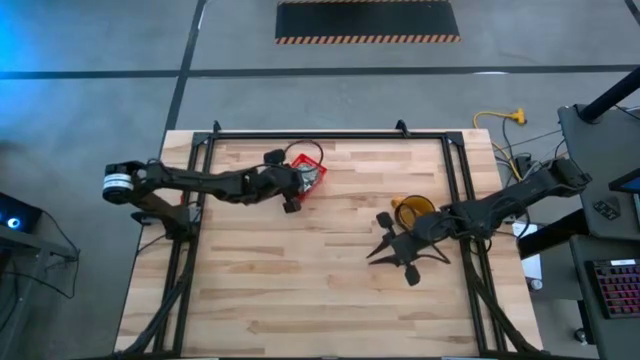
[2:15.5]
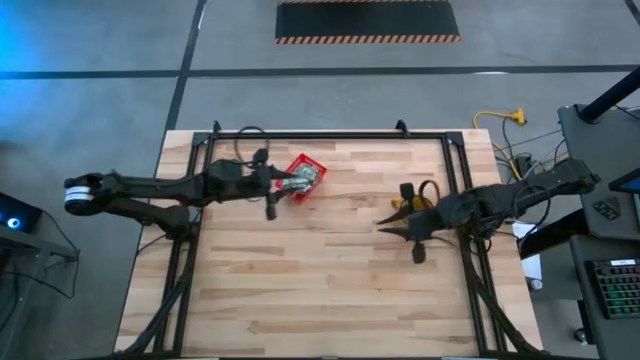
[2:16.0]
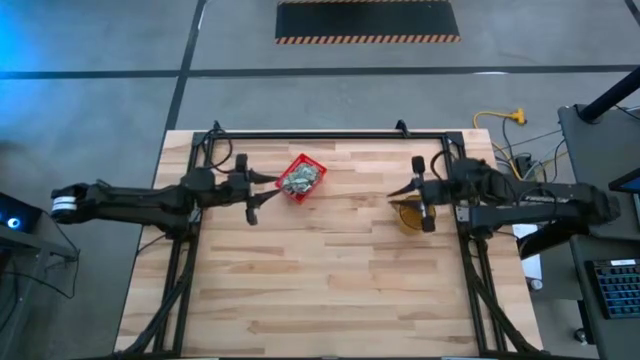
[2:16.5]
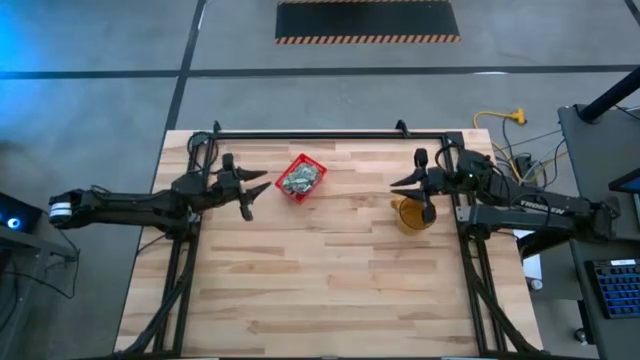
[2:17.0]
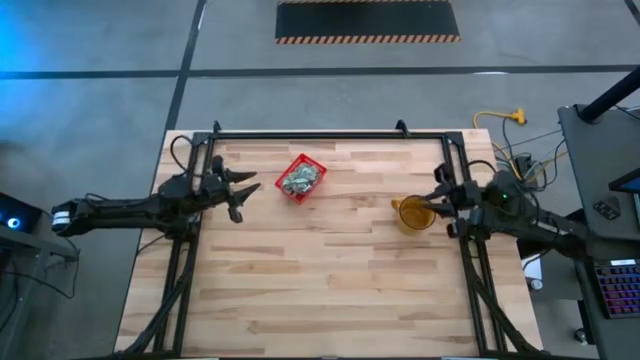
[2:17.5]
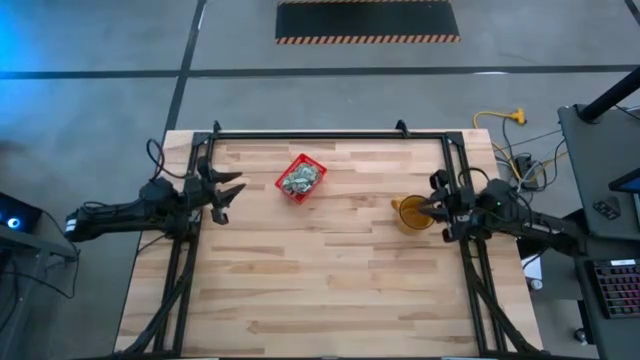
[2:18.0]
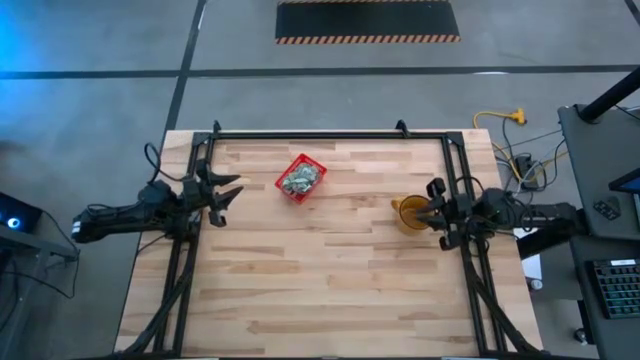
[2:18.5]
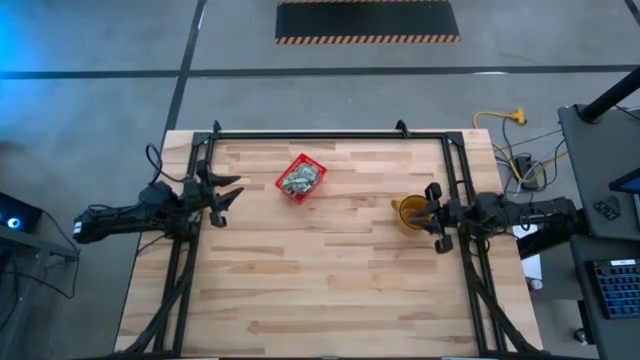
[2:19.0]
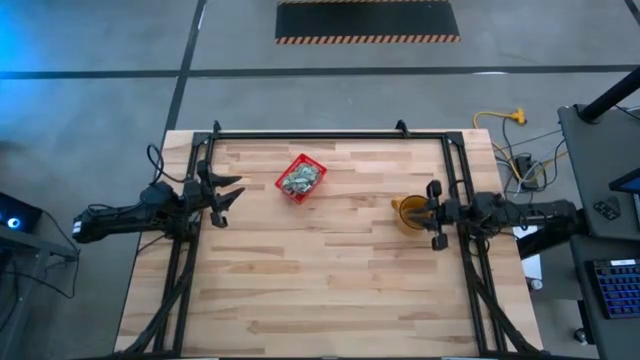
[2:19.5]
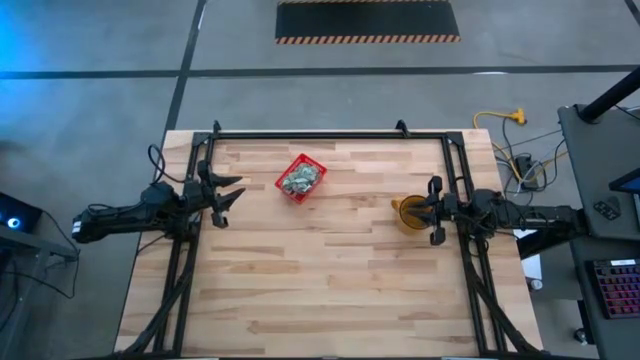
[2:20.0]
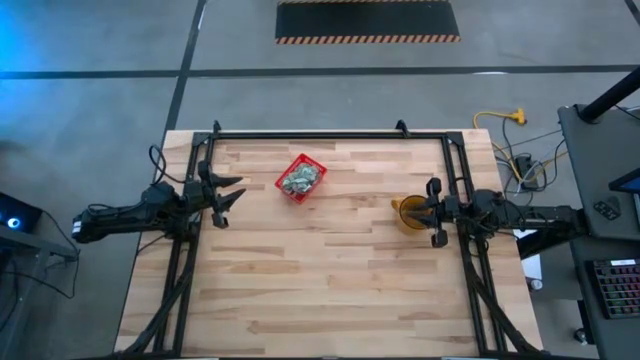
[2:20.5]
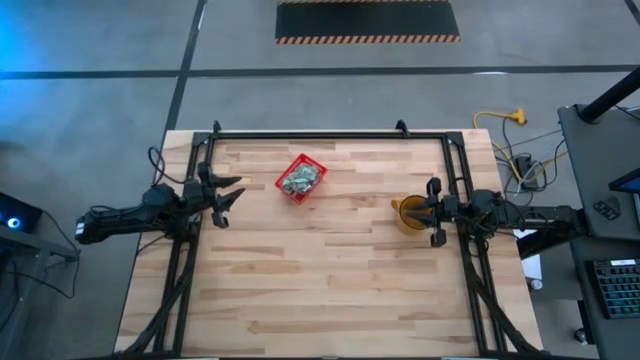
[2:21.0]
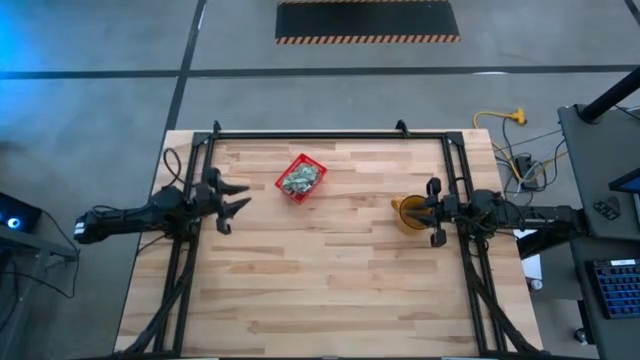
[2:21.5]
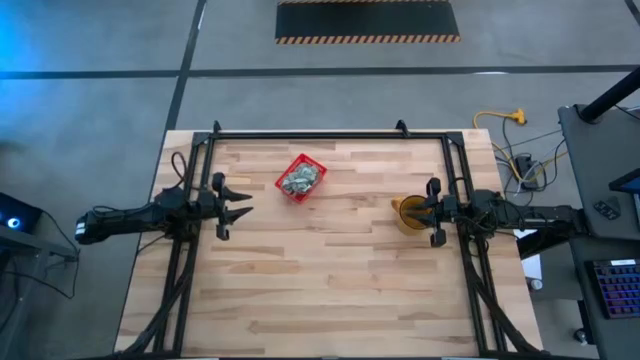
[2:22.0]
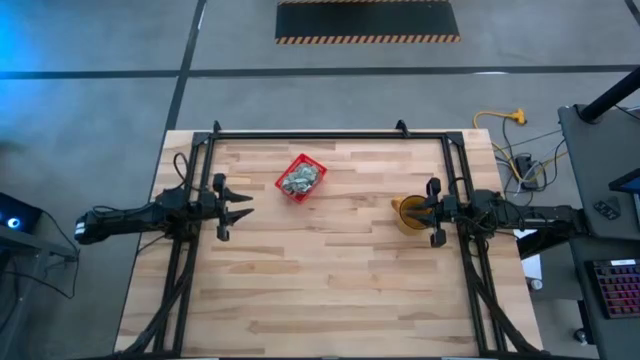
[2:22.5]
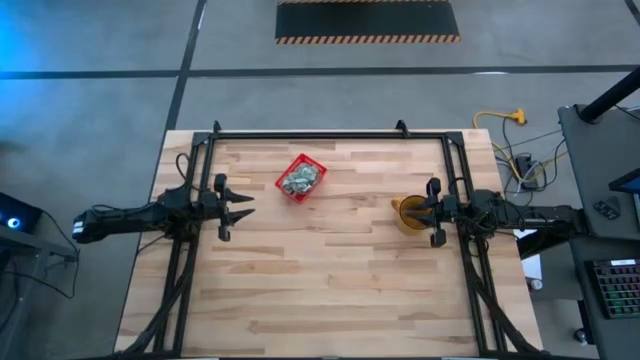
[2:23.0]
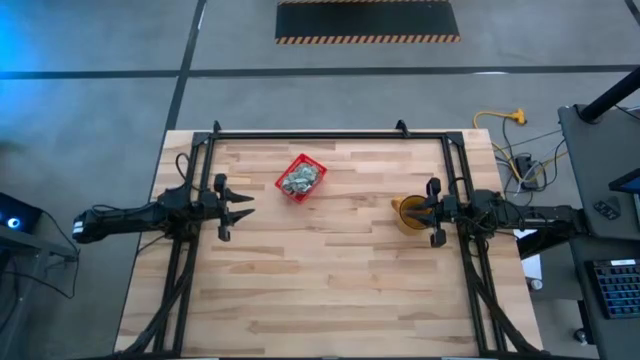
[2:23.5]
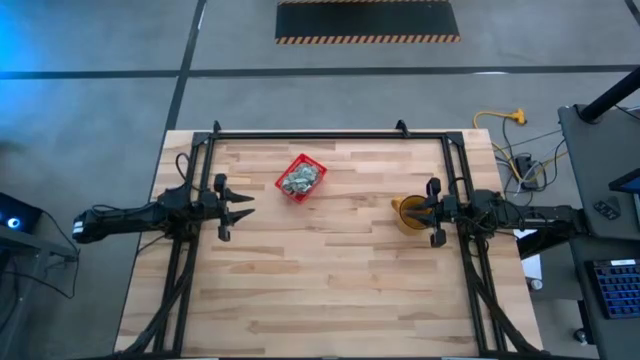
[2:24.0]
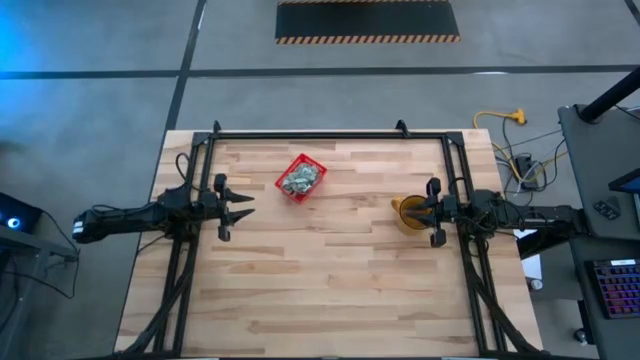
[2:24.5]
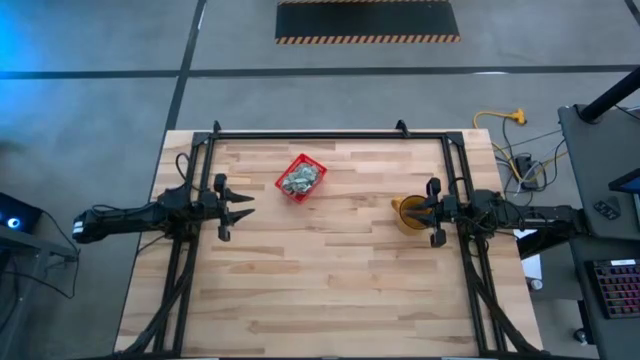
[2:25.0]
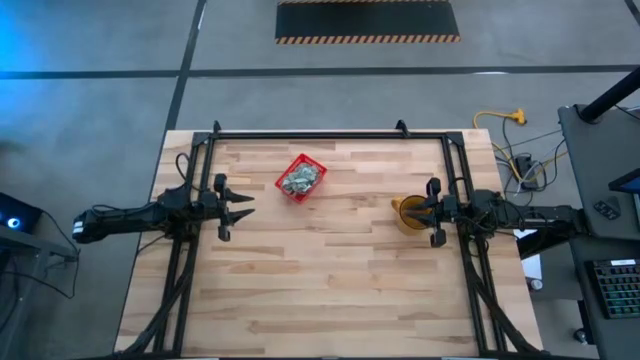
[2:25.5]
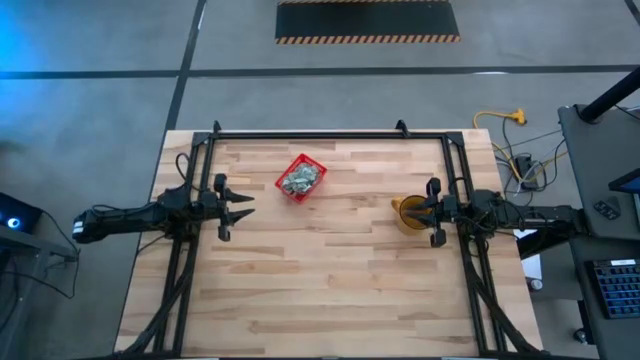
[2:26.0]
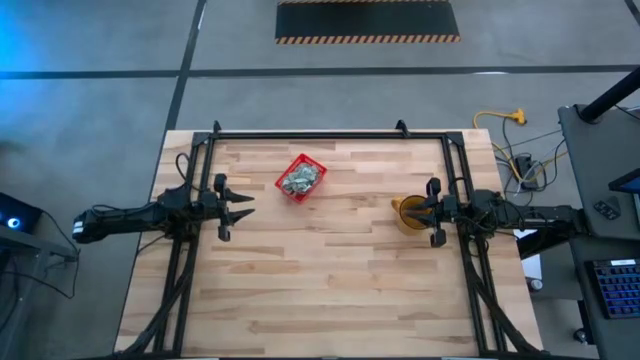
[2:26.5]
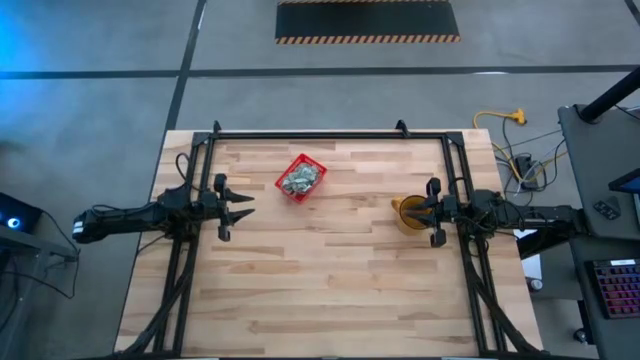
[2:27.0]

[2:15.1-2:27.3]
Task: Pick and place Stevia / Truvia into bins
Return to Home Position

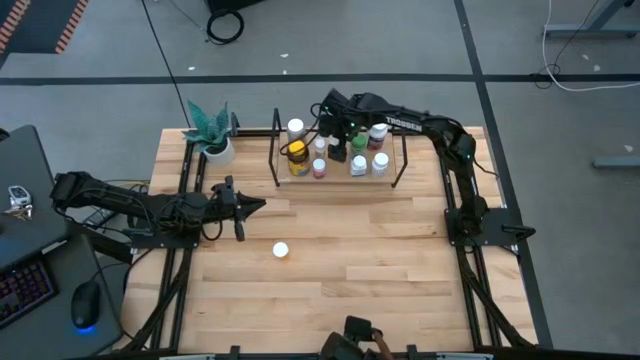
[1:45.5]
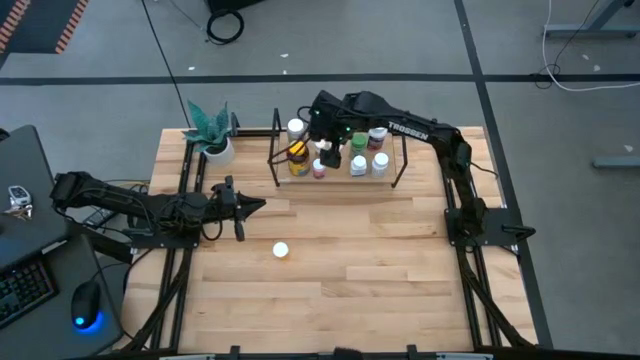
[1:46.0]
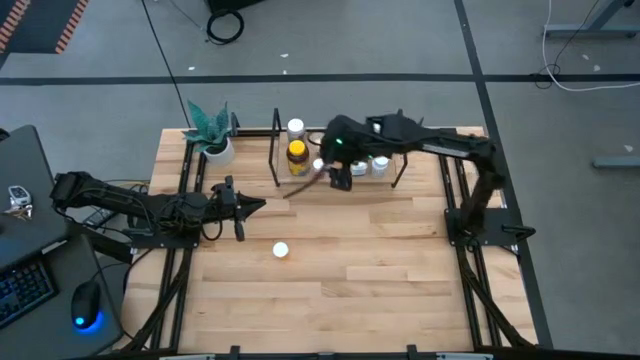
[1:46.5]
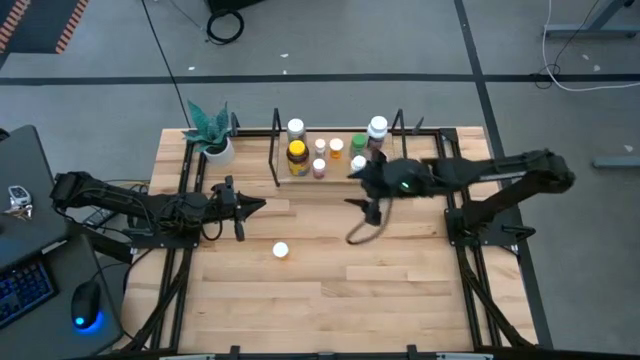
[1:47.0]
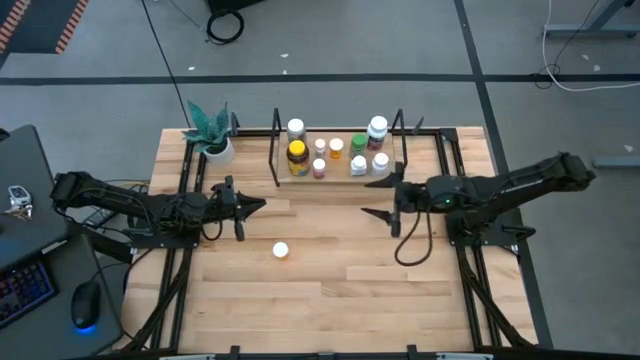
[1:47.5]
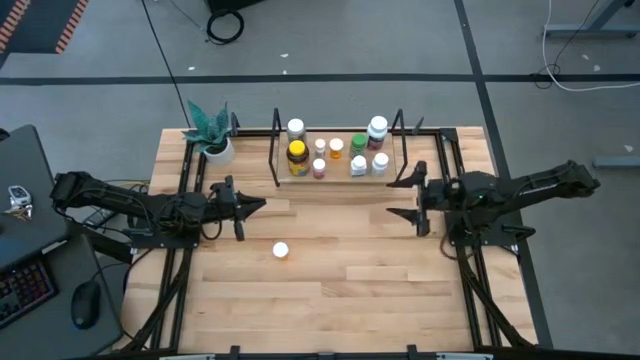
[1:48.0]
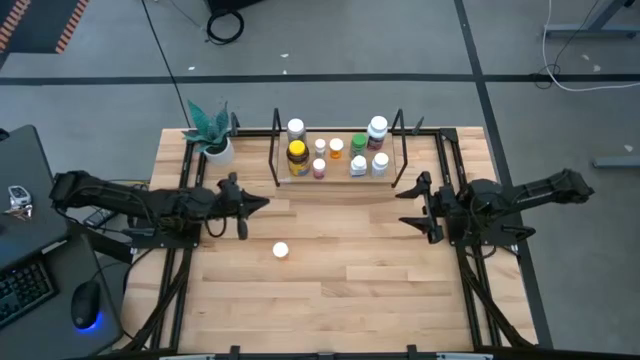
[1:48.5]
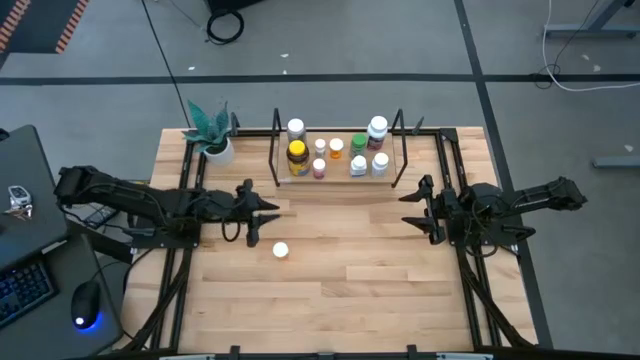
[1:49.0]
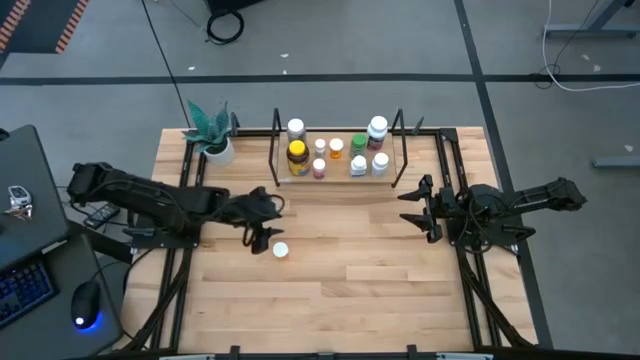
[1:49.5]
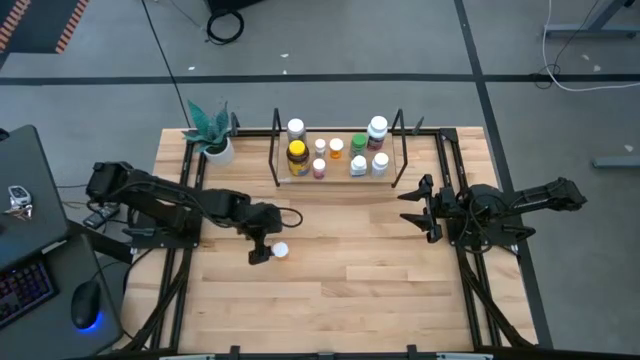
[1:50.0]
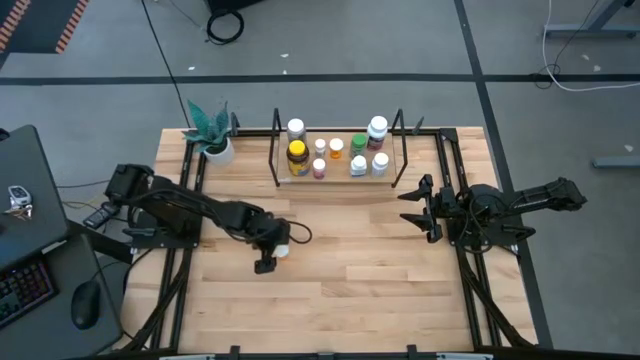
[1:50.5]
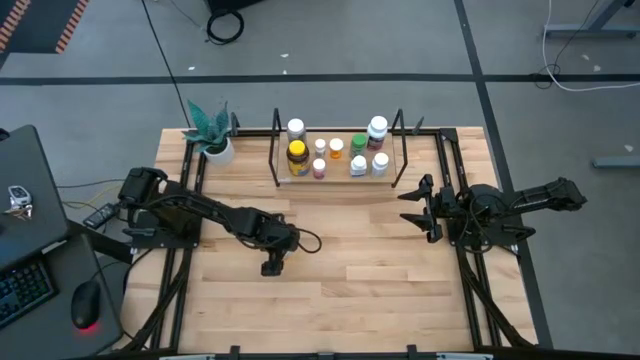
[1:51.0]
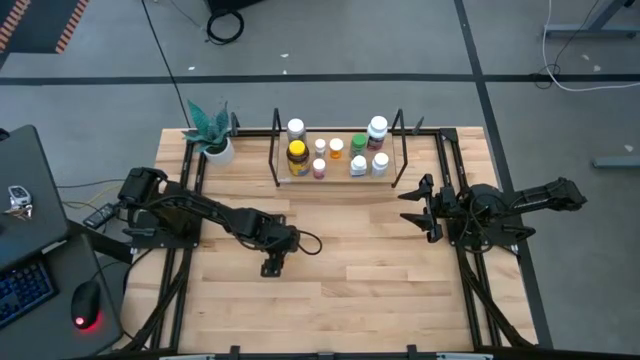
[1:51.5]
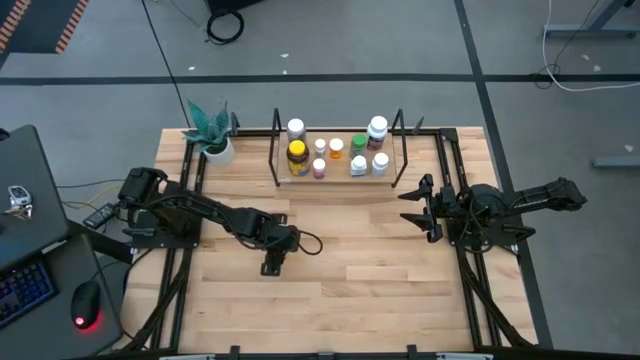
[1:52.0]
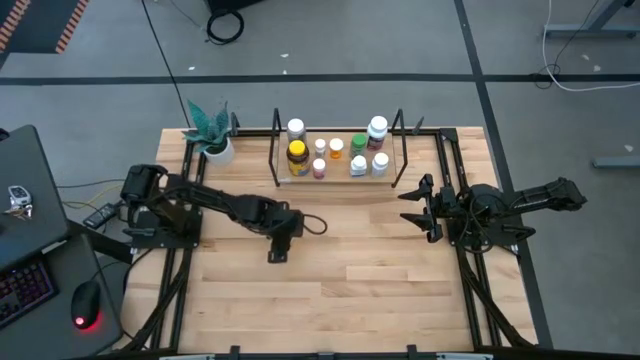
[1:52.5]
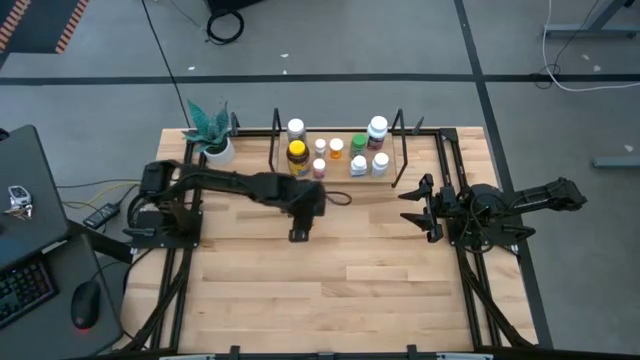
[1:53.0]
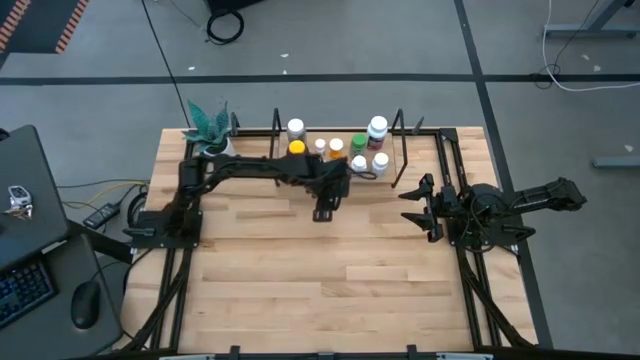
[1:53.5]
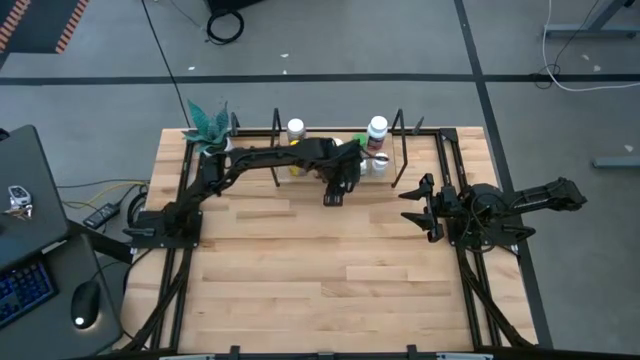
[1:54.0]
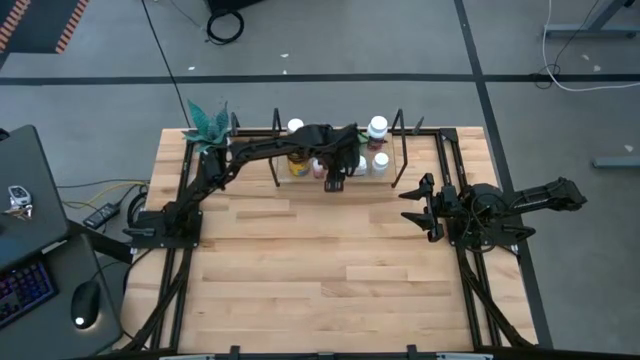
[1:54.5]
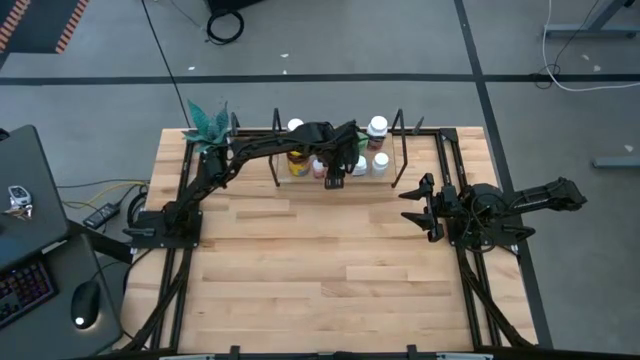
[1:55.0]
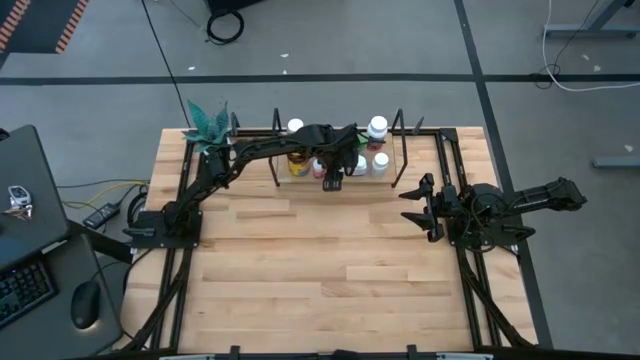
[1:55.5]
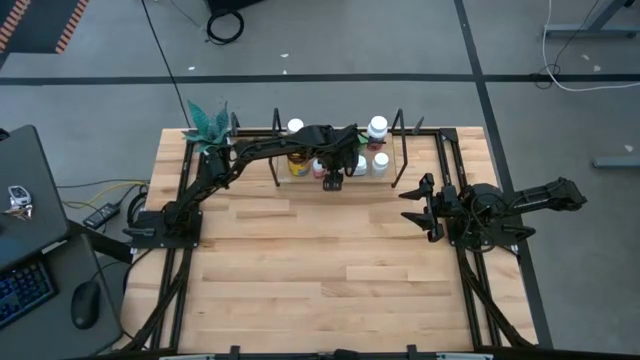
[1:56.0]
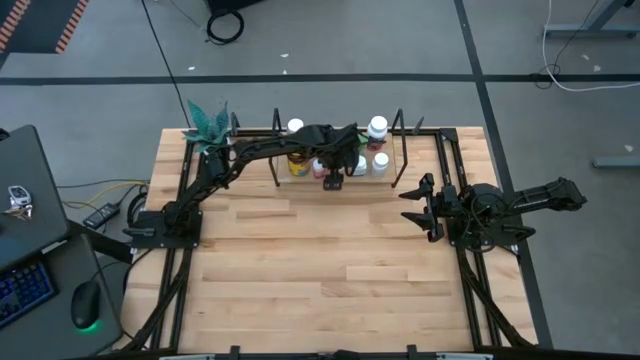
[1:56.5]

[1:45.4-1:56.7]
Task: Pick and place medicine bottles onto shelf by color
Put the orange medicine bottle on the shelf
